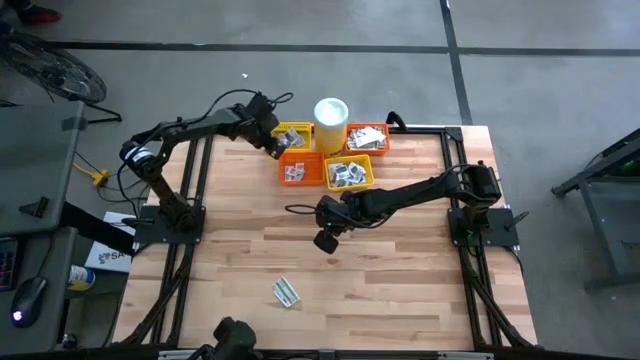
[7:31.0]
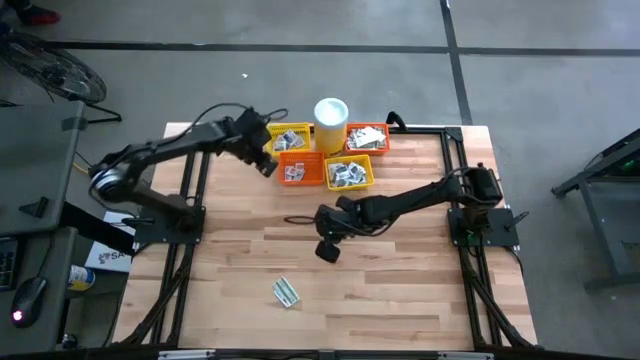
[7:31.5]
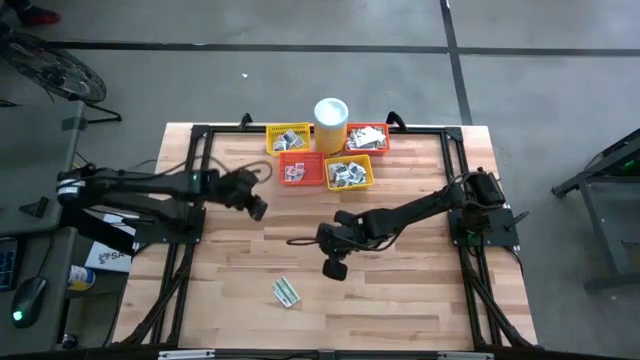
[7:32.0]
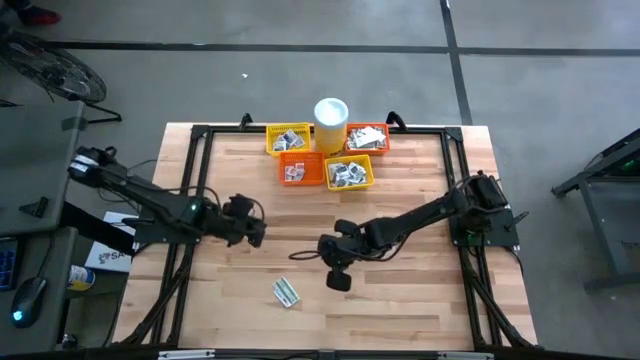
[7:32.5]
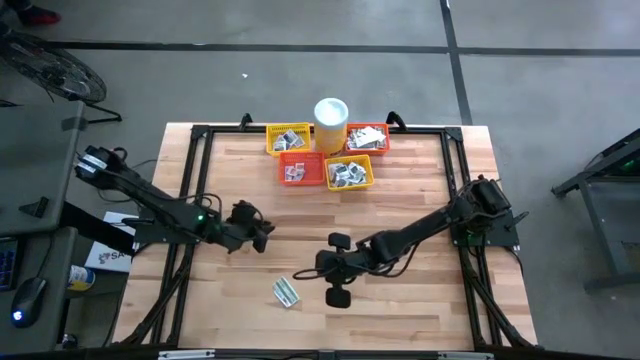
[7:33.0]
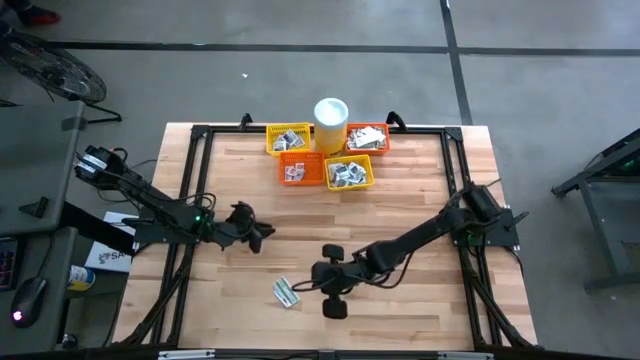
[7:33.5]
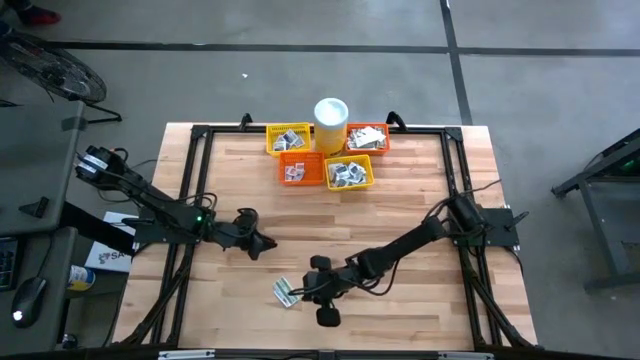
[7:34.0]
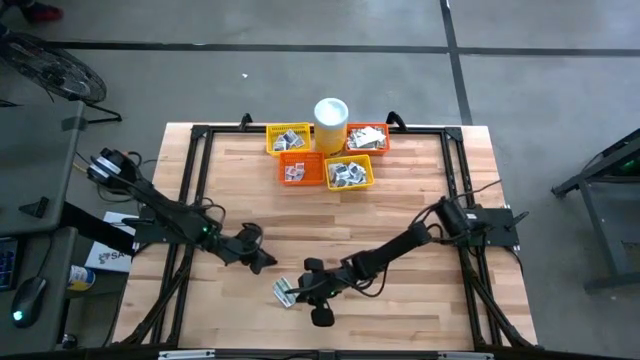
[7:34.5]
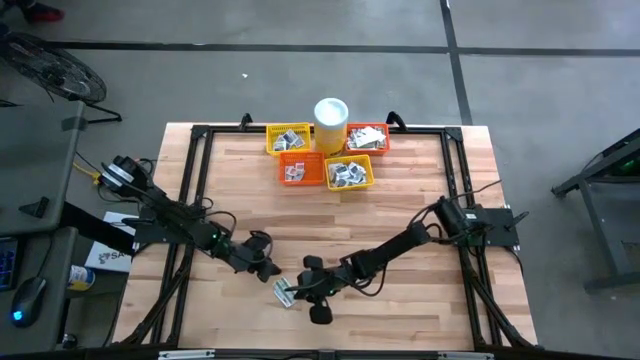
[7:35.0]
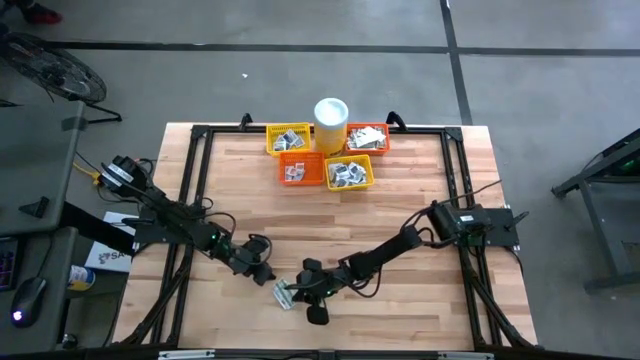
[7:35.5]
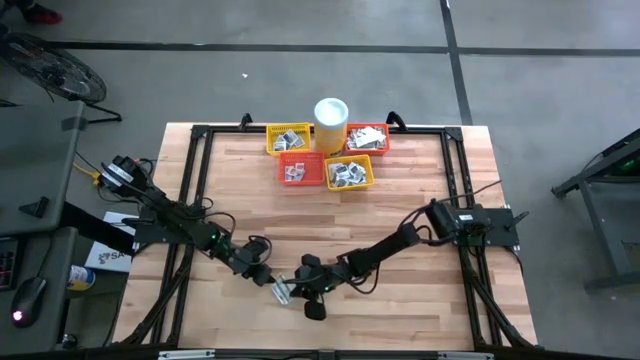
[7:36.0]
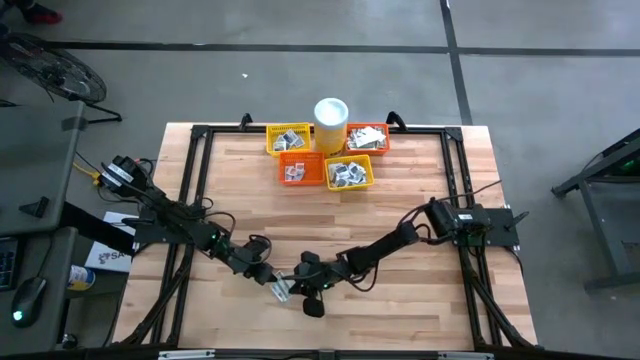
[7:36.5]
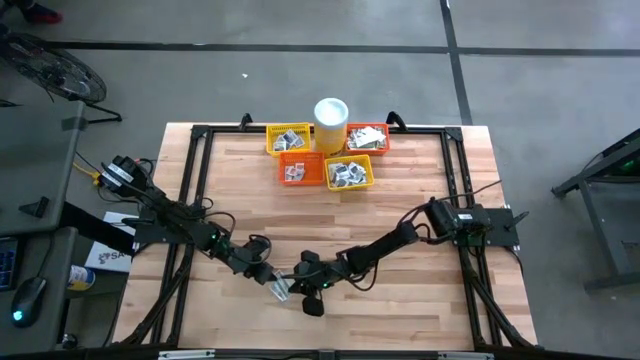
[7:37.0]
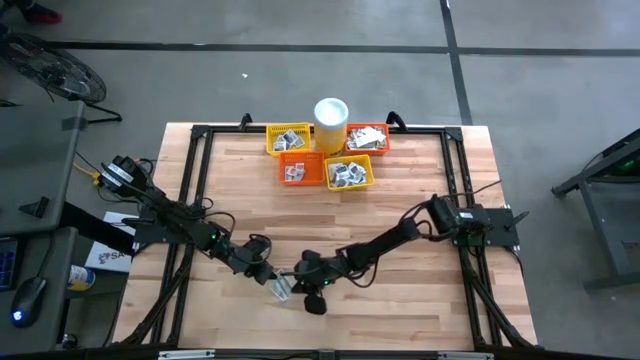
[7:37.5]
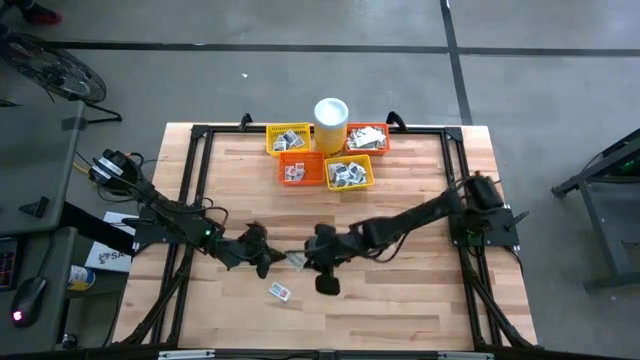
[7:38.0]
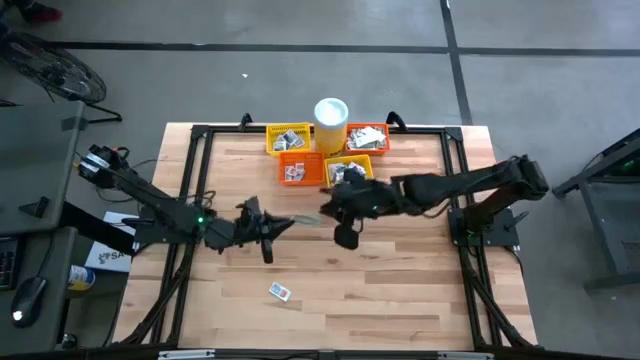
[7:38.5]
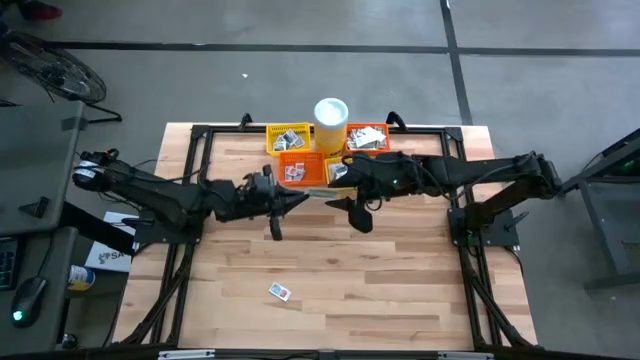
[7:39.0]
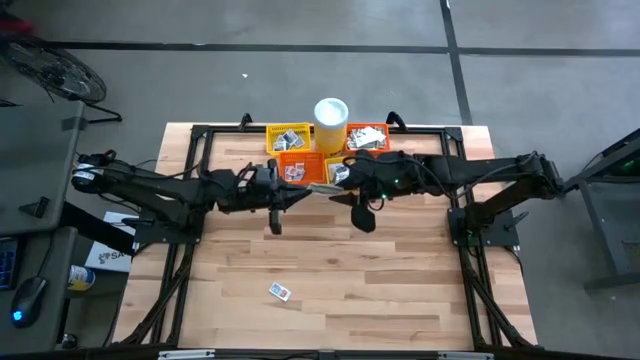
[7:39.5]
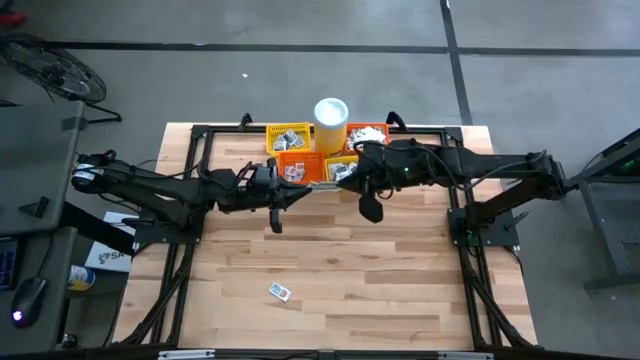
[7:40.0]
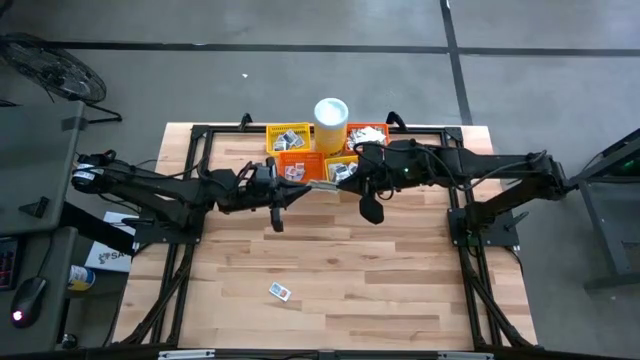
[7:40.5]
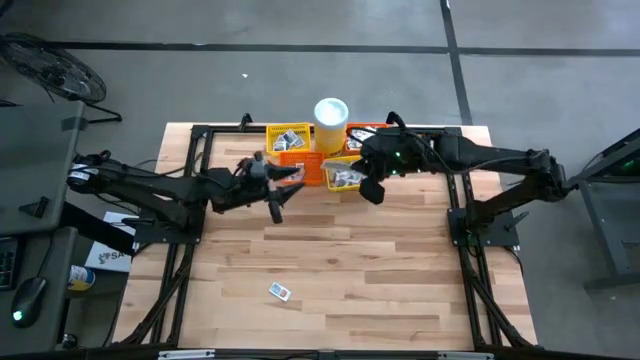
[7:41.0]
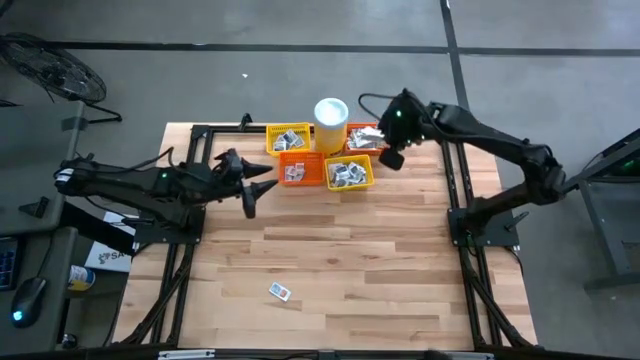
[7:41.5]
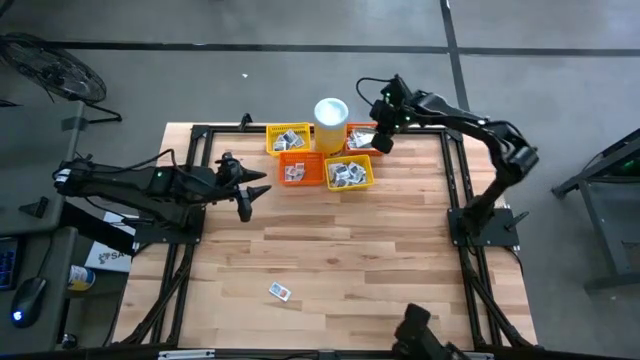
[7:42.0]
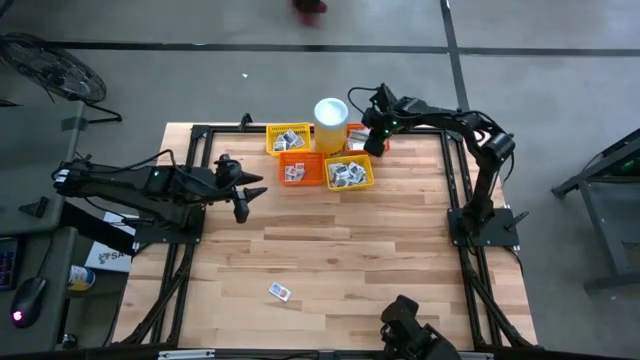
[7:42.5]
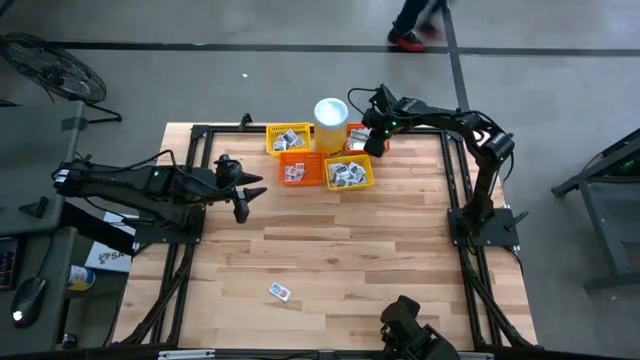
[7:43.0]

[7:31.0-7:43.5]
Task: Pick & Place First Aid Supplies
Put the green bandage pack into the top orange basket

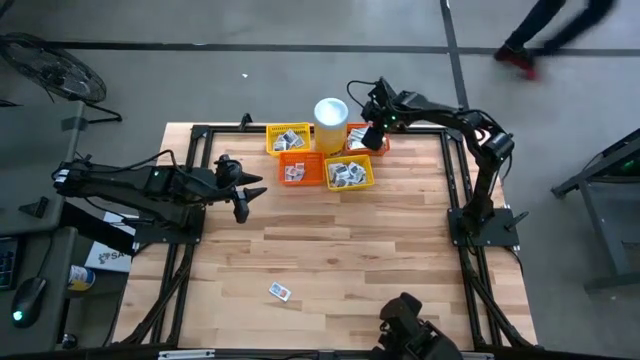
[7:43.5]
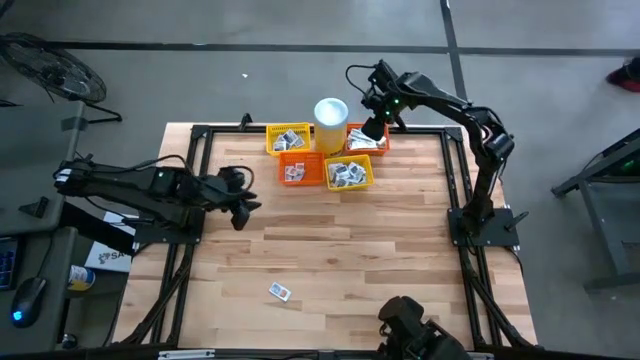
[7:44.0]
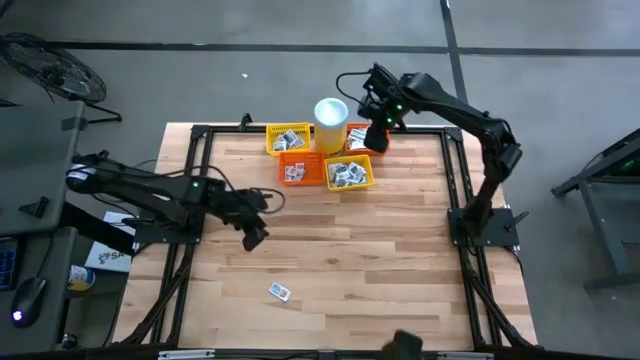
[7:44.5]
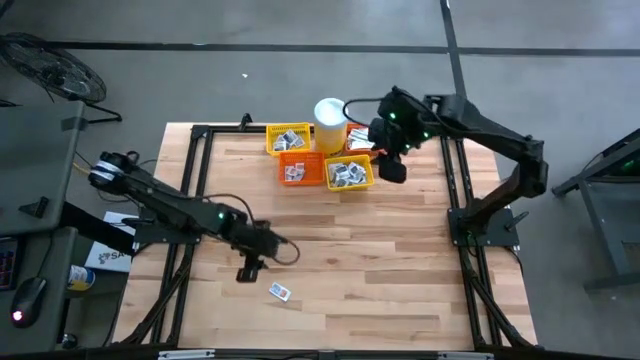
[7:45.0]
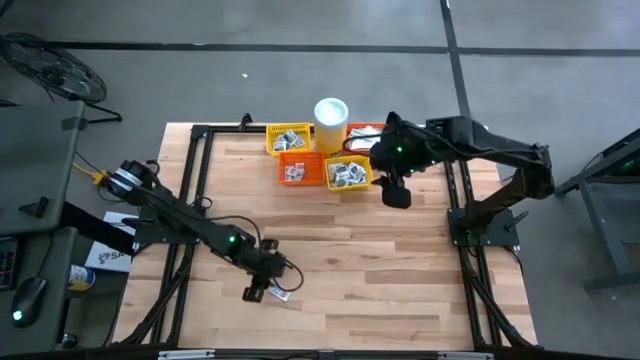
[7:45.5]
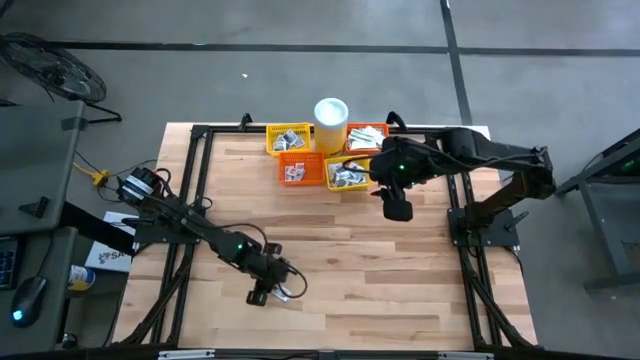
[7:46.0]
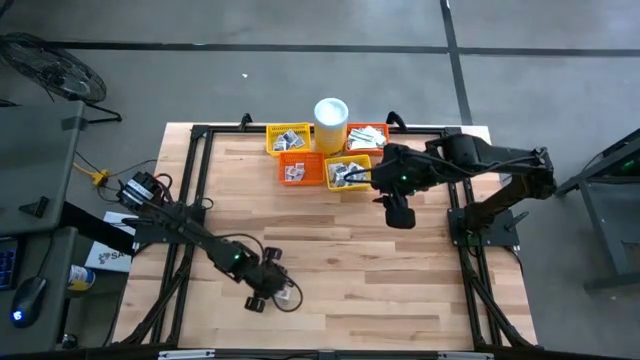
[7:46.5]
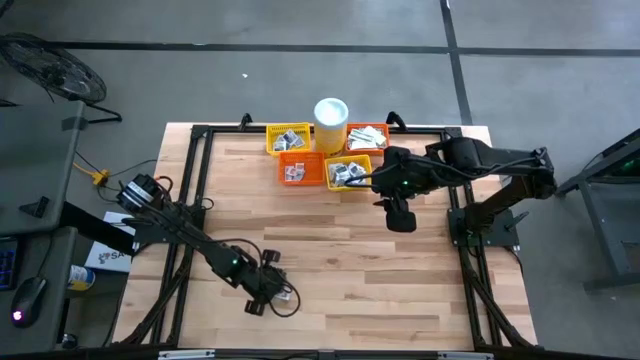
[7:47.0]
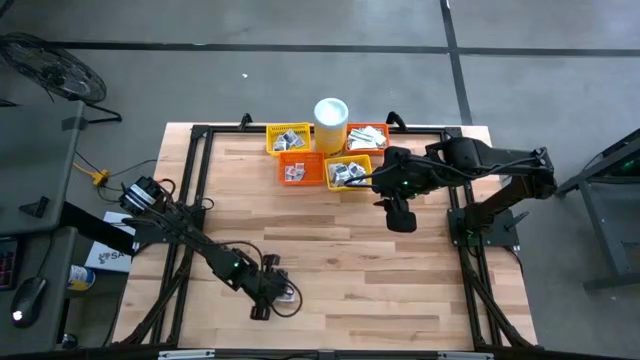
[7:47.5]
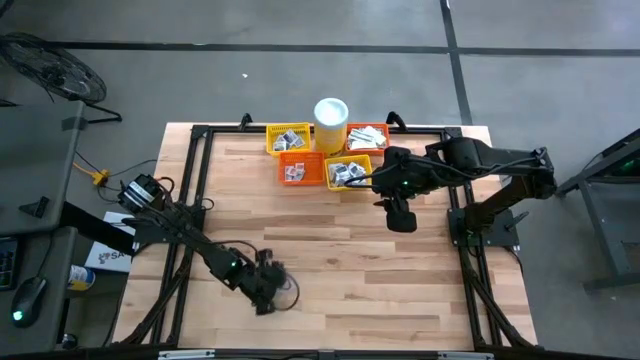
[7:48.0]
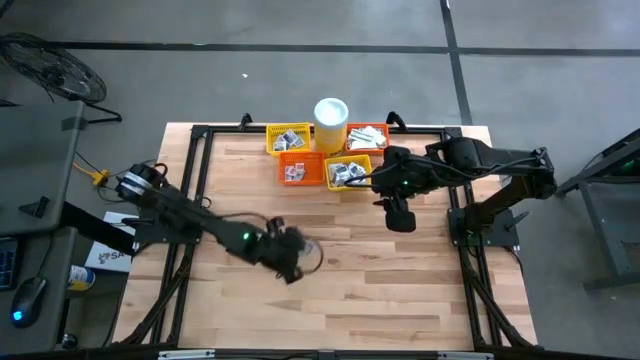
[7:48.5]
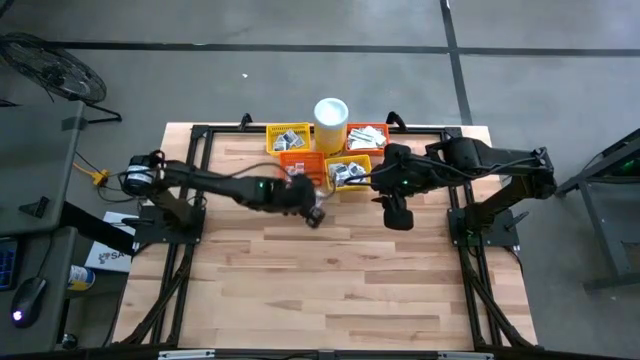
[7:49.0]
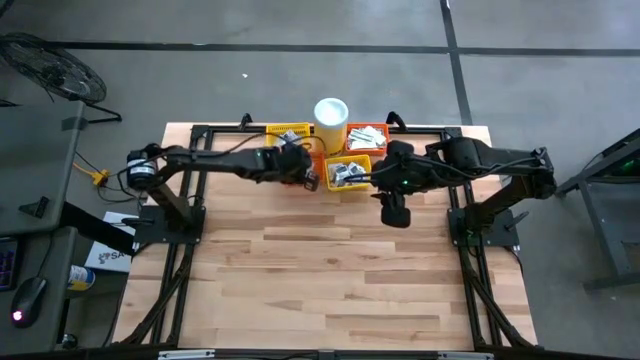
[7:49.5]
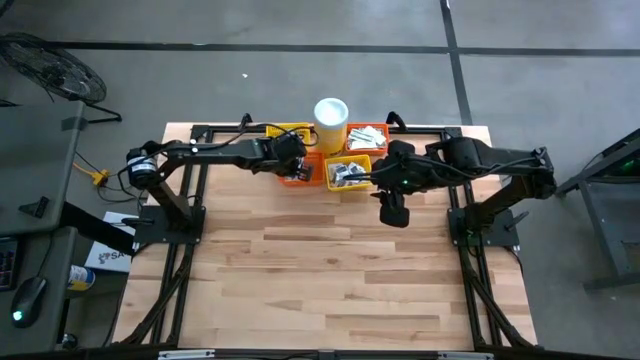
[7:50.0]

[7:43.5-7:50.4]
Put the orange ointment pack into the bottom orange basket

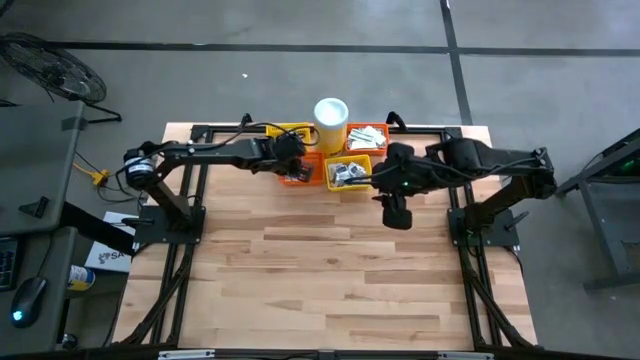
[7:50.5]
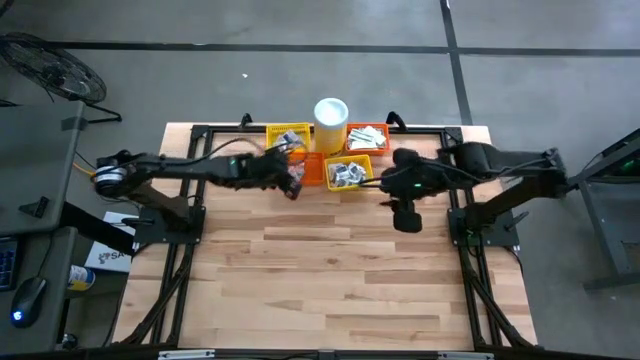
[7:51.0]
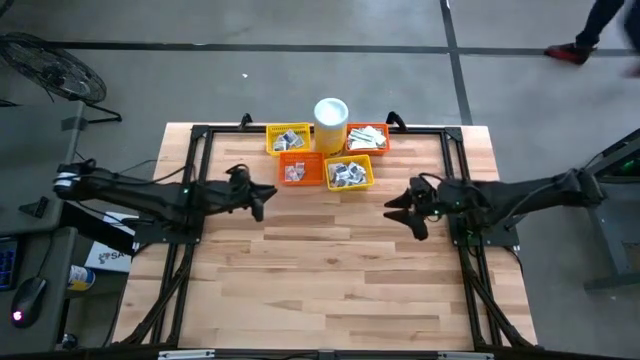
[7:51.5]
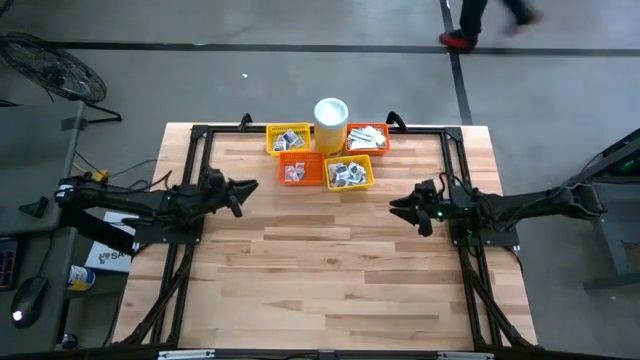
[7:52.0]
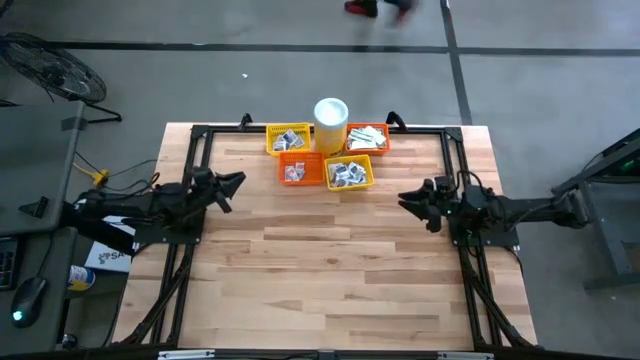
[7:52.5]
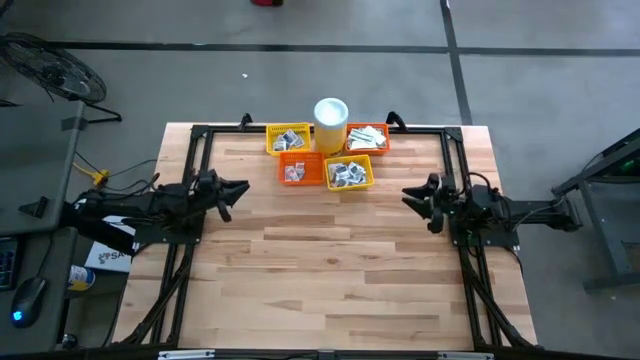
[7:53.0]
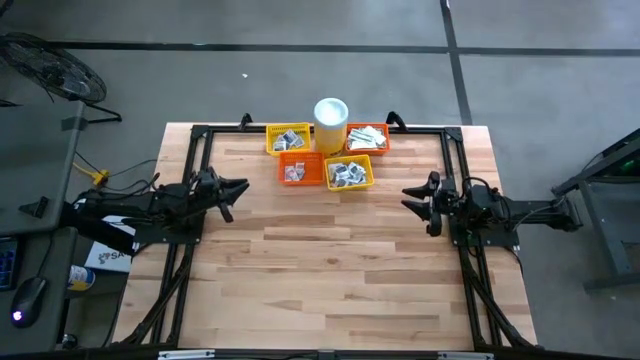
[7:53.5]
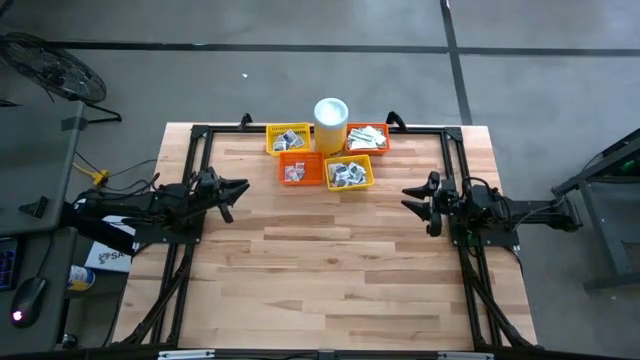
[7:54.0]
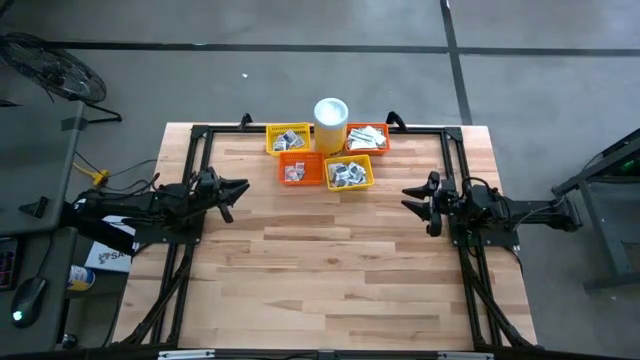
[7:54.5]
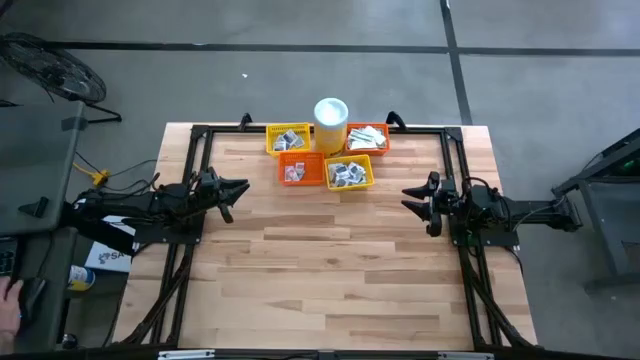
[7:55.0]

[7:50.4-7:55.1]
Return to Home Position
